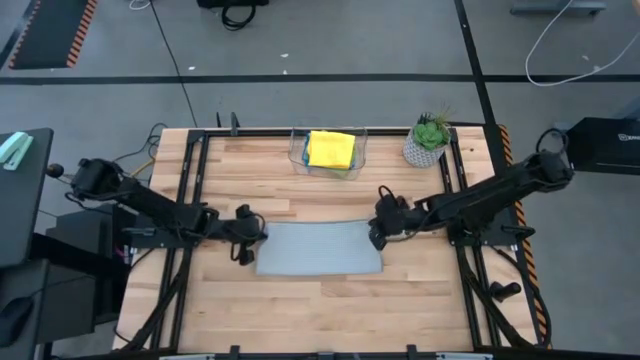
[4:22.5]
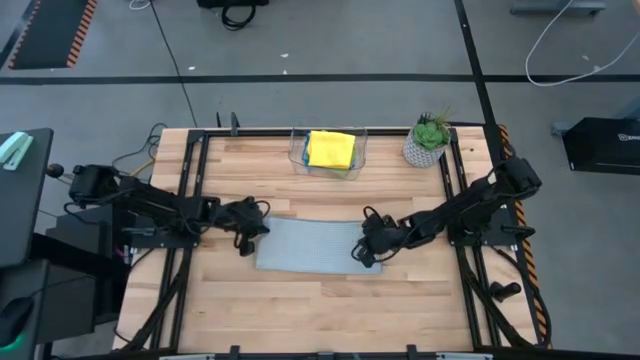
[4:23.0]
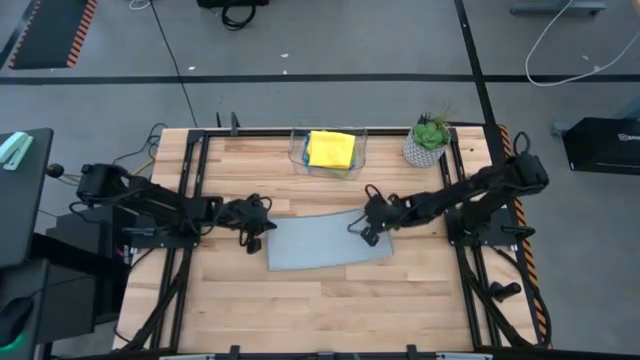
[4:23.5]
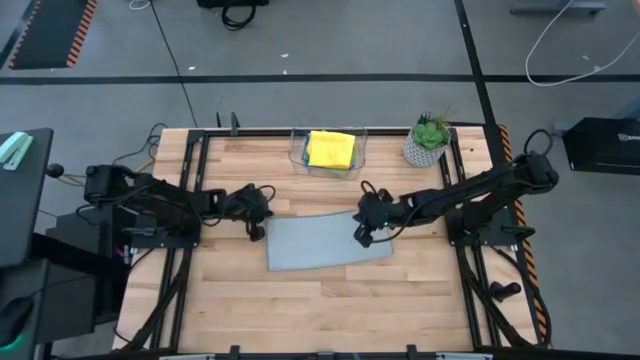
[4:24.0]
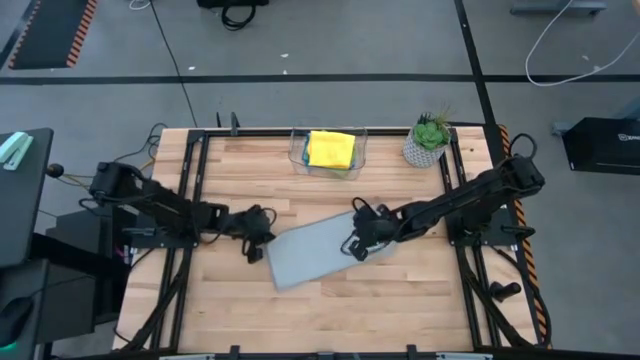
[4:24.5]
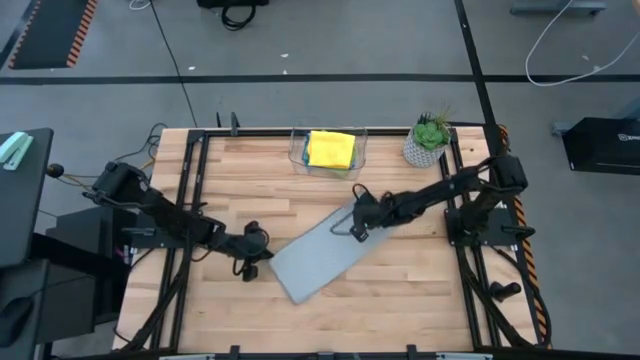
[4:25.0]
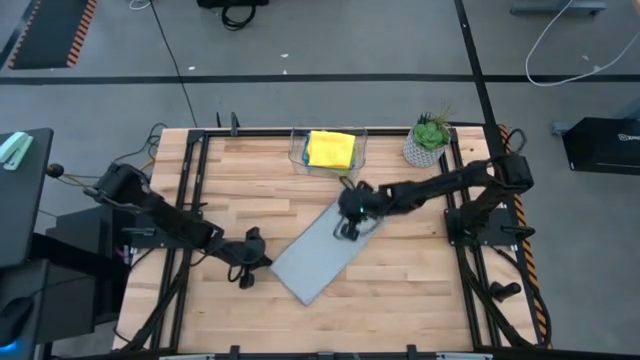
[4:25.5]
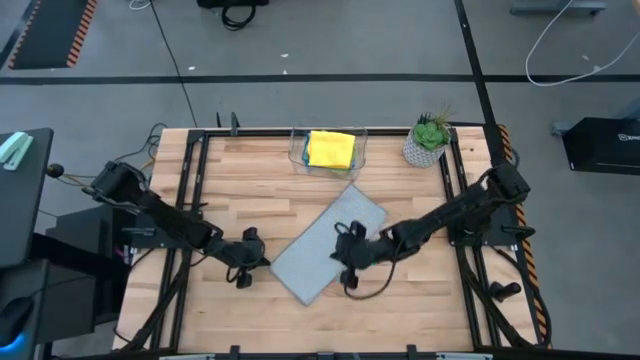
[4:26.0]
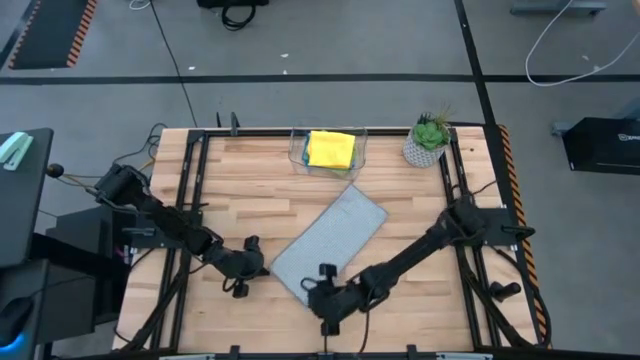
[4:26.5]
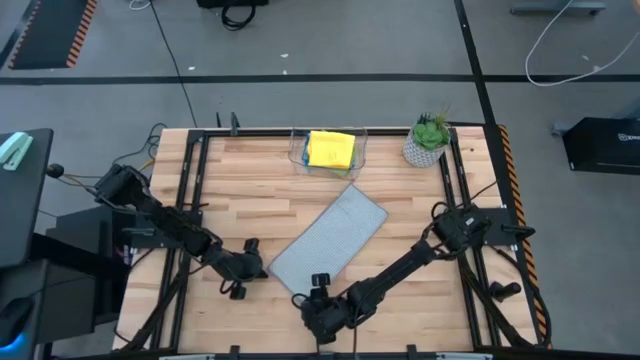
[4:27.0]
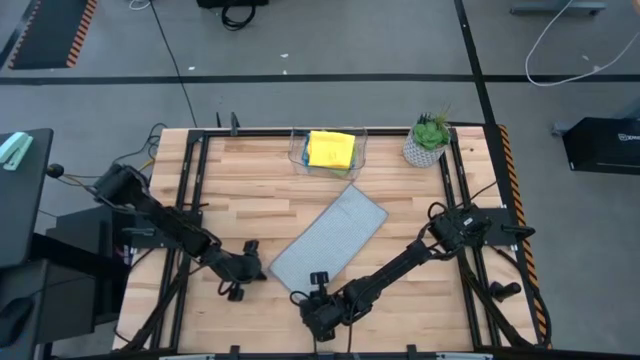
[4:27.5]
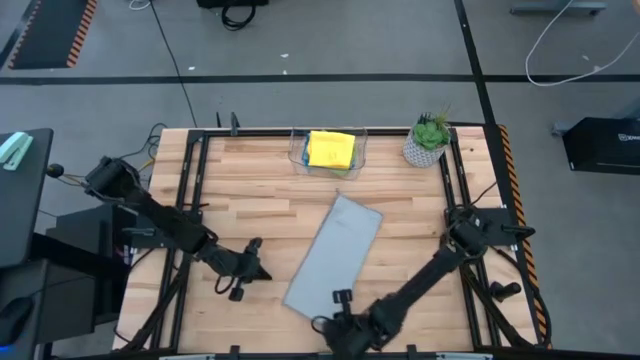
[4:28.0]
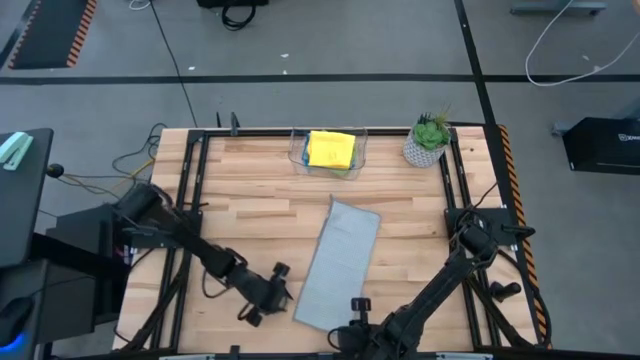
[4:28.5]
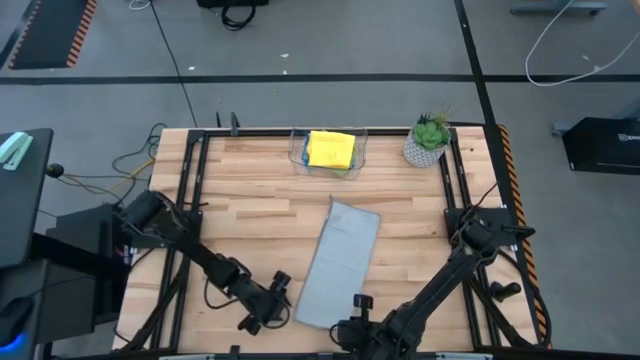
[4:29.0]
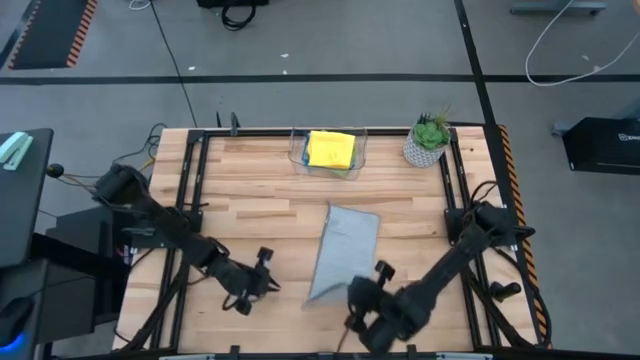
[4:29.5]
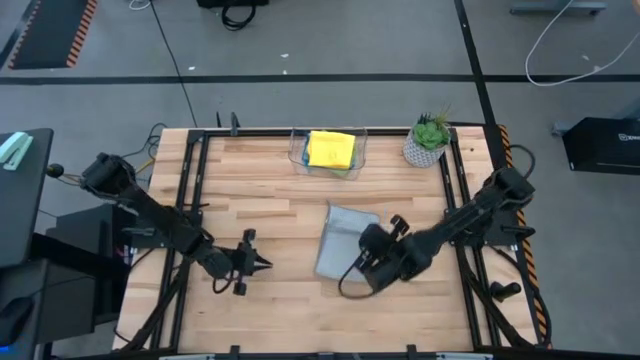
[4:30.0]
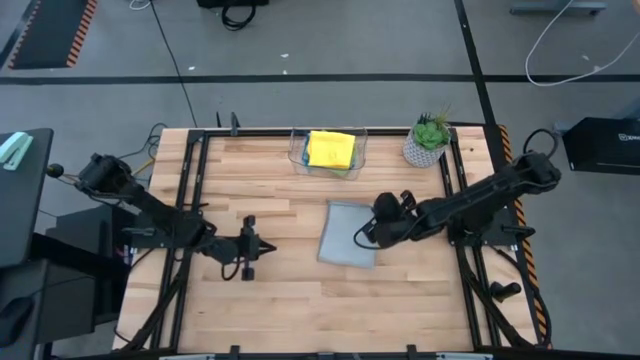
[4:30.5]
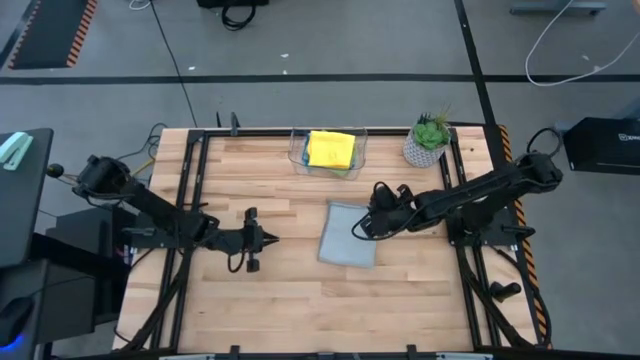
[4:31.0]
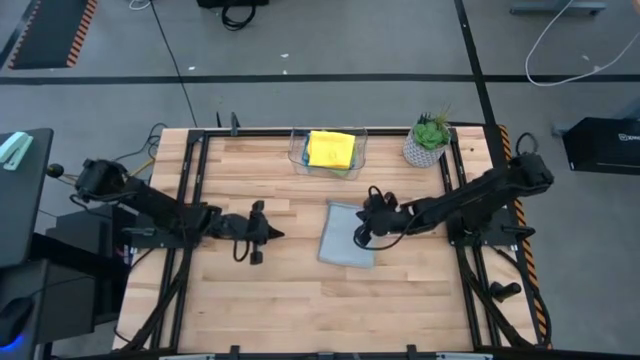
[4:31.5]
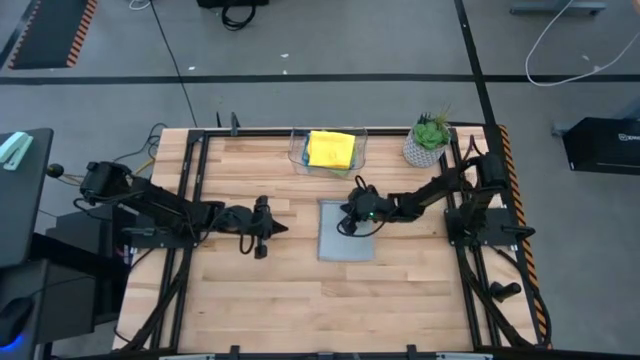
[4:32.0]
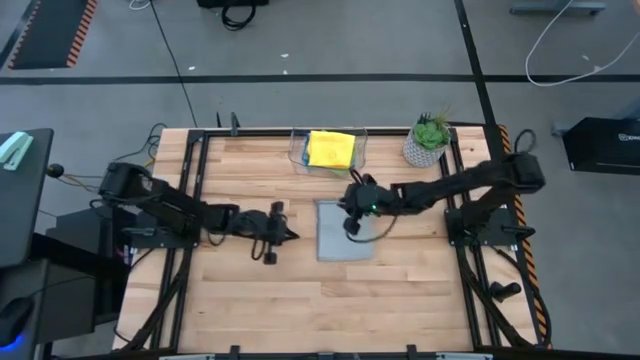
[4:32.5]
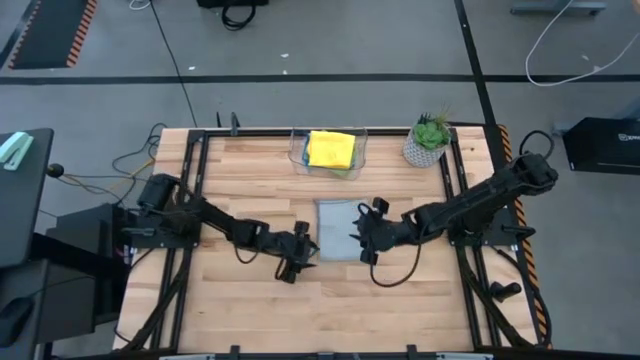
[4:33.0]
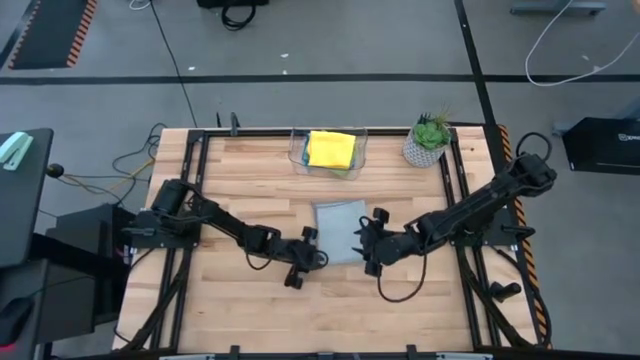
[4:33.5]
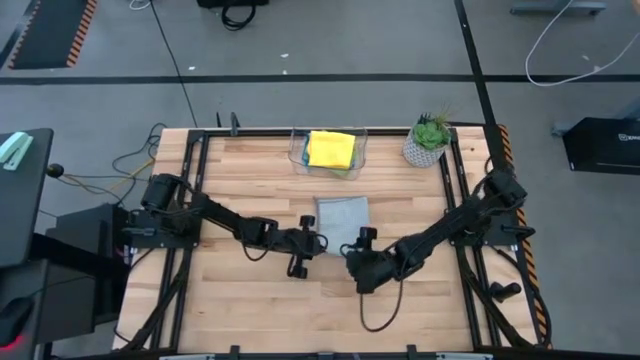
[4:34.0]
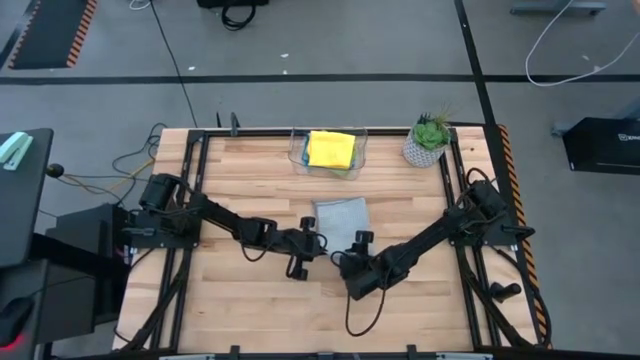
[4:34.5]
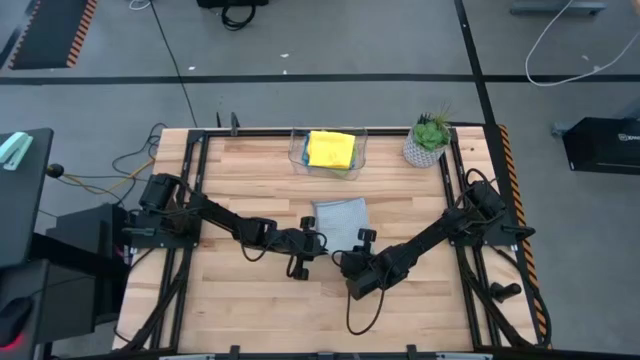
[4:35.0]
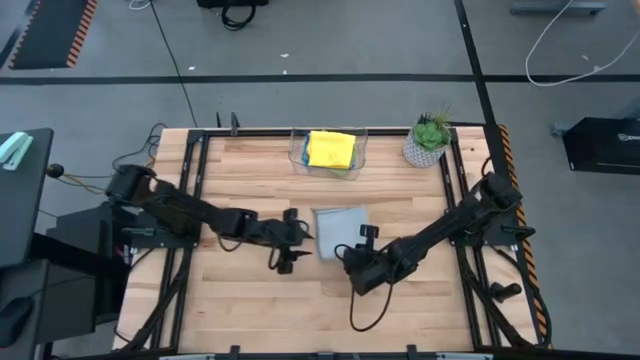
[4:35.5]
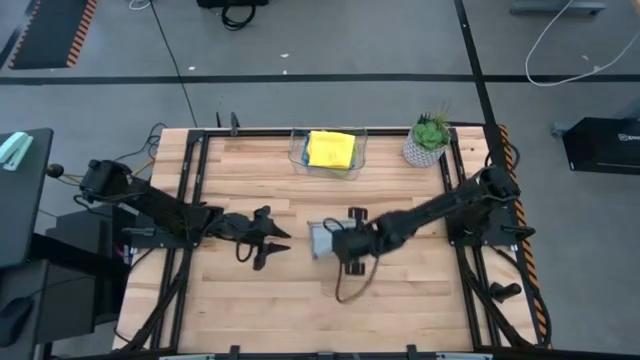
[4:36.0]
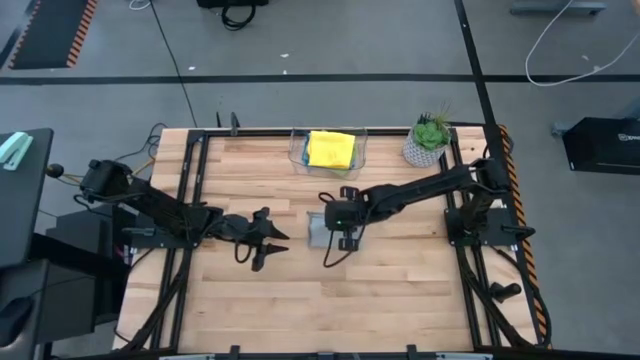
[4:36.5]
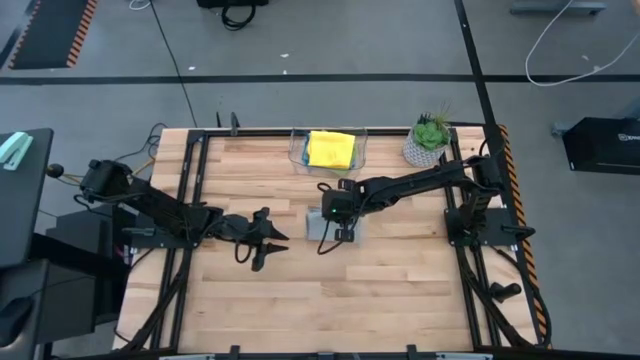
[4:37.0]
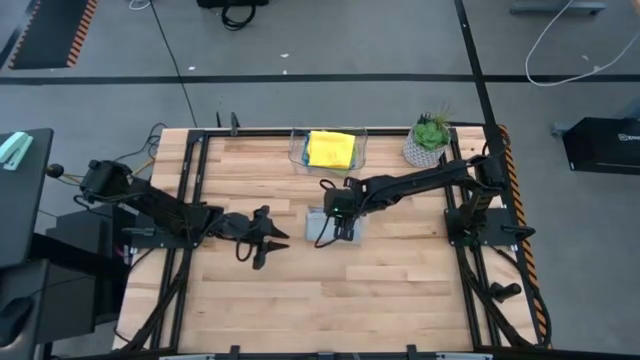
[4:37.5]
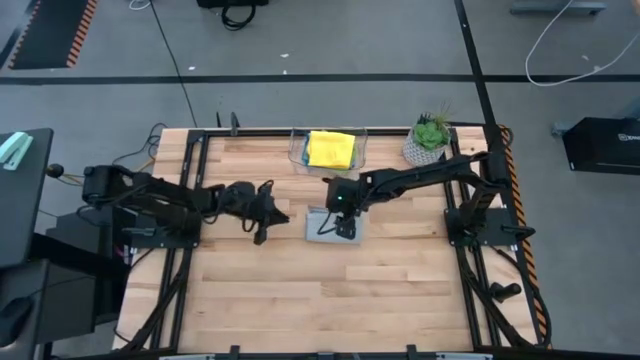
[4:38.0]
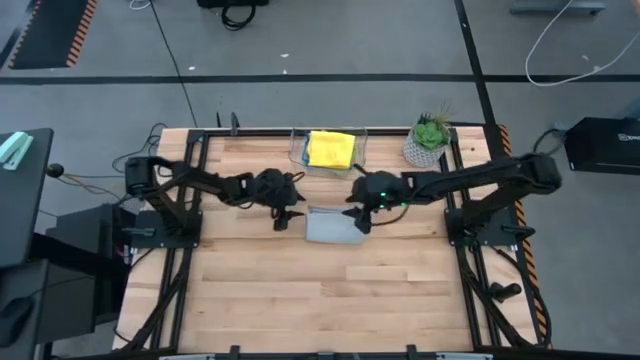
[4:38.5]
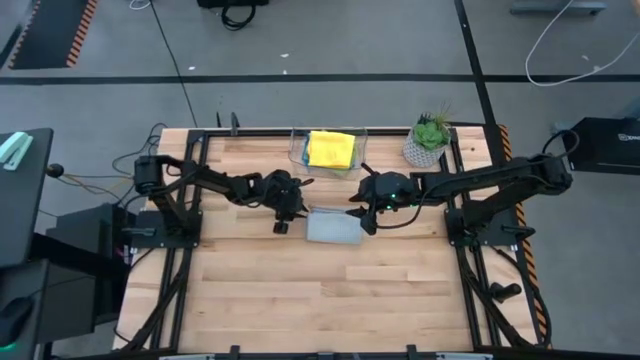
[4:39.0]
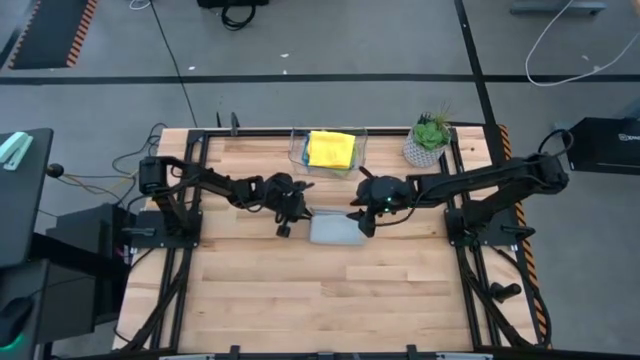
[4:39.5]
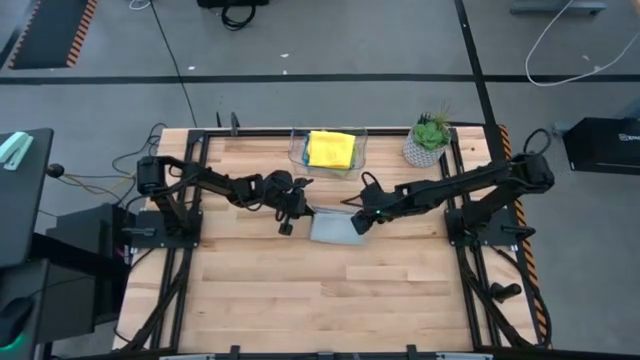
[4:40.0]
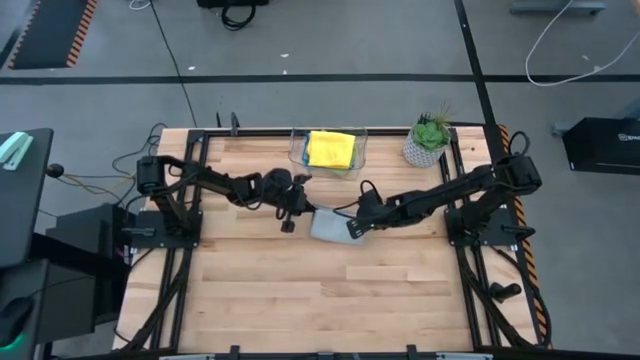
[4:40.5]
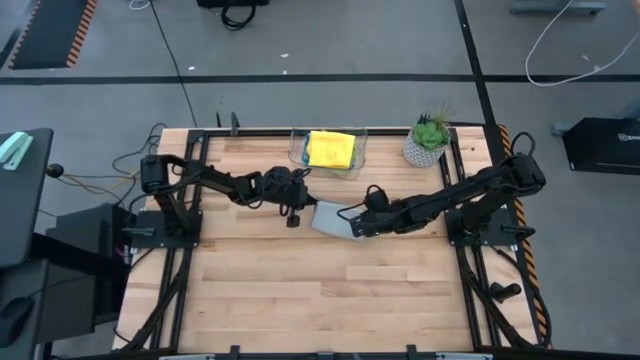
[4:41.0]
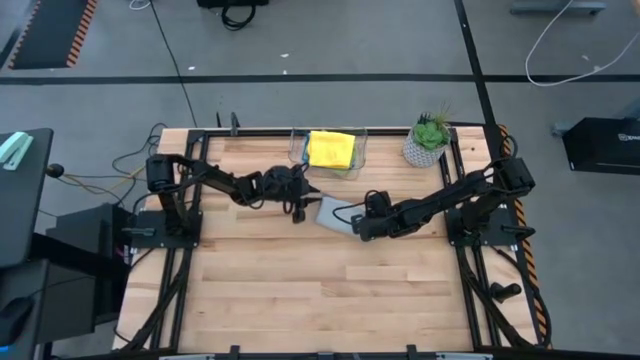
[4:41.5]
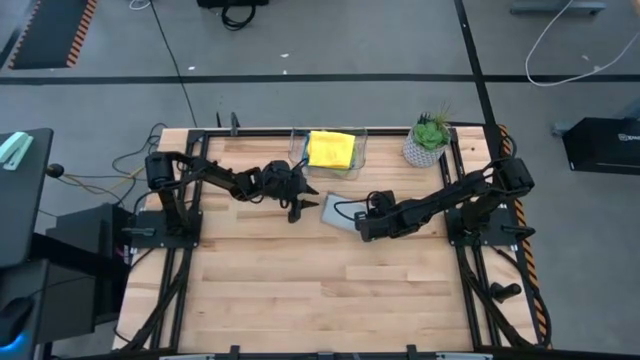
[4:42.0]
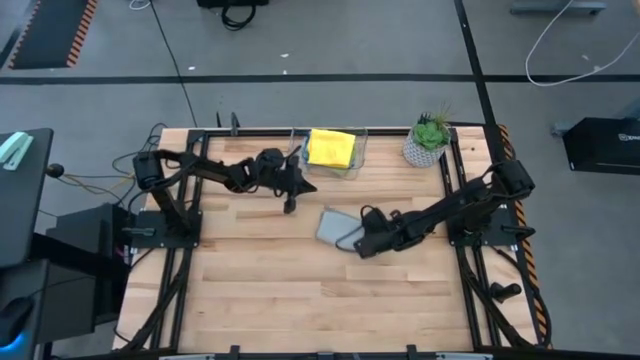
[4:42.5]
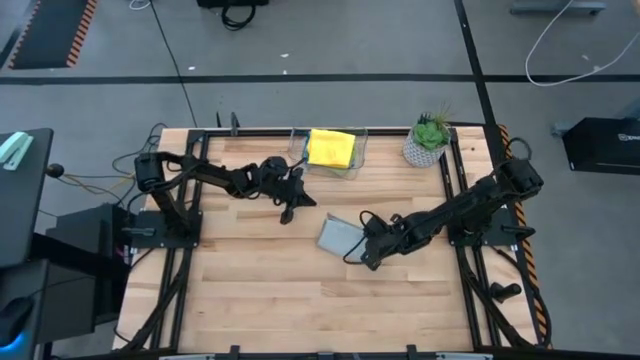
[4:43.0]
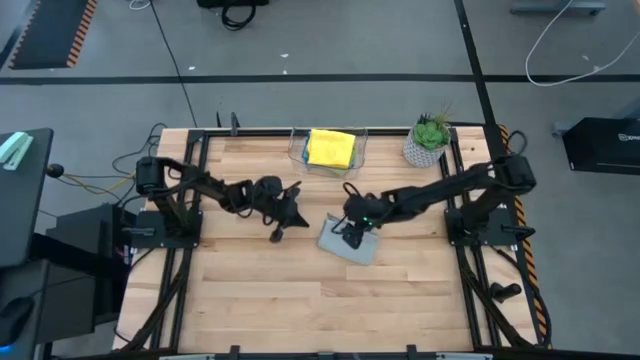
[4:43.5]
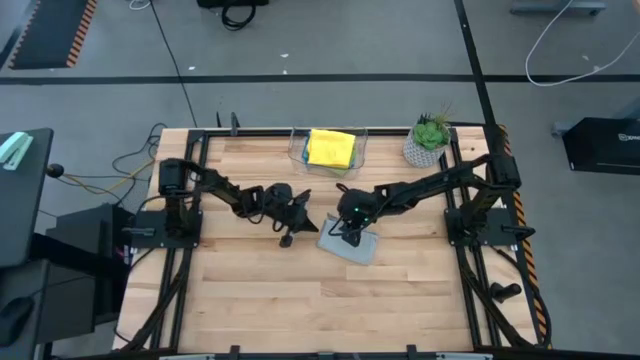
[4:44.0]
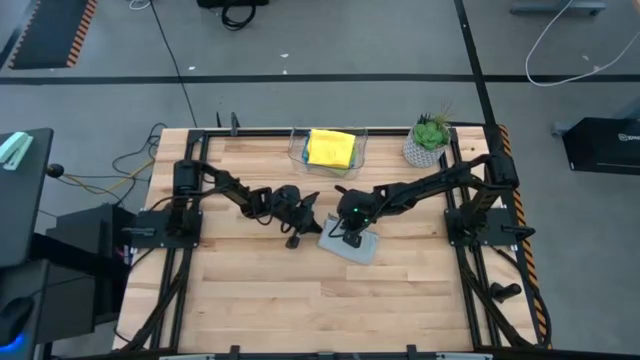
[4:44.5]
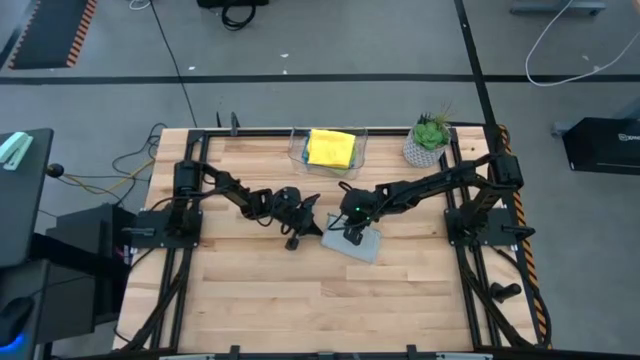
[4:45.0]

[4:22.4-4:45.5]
Task: Fold microfiber towels
Fold the gray microfiber towel
